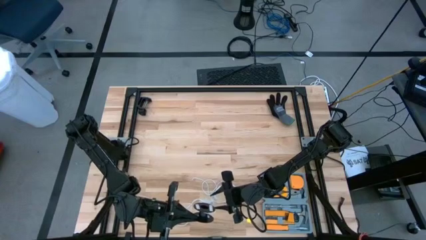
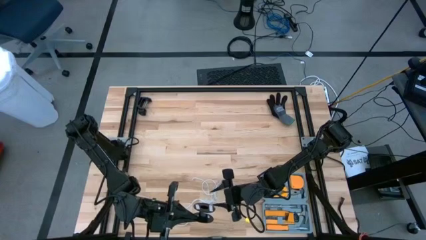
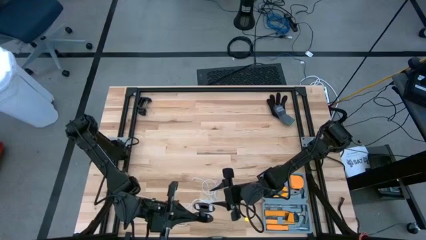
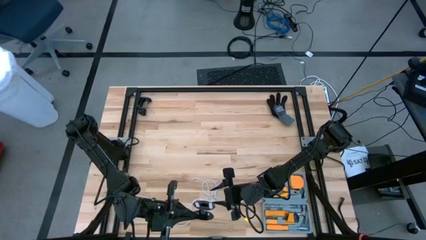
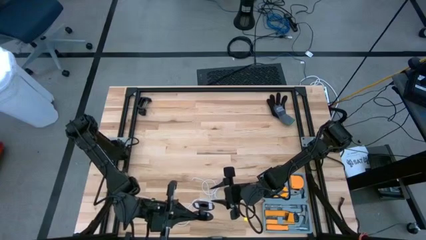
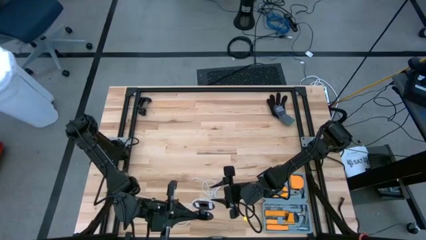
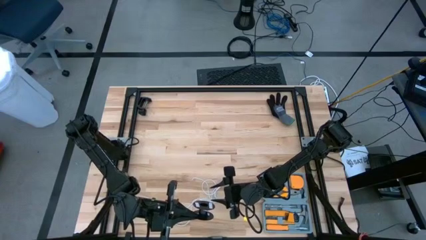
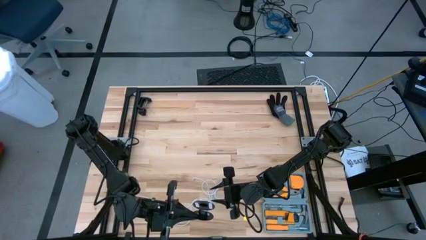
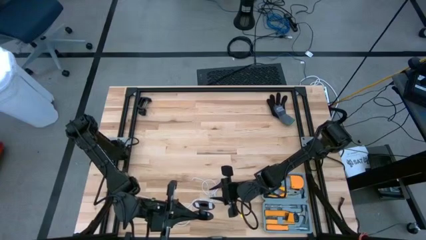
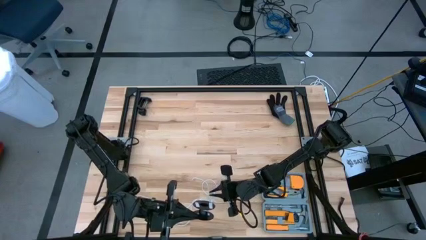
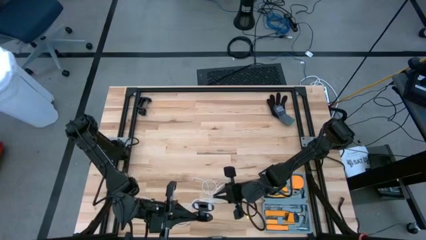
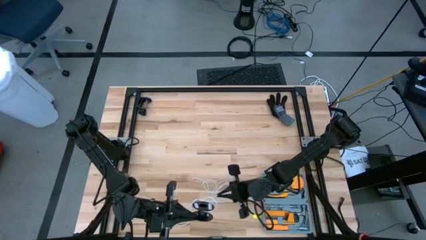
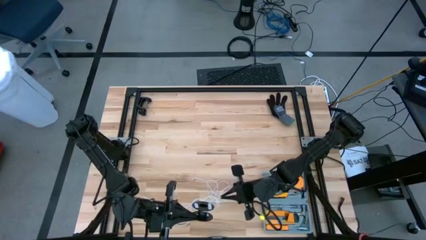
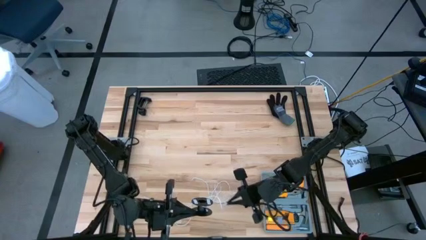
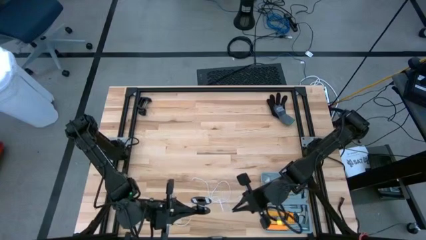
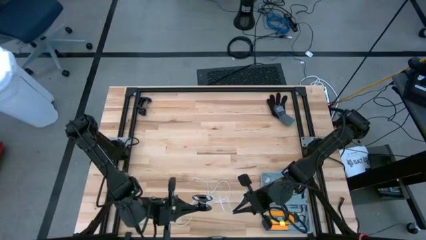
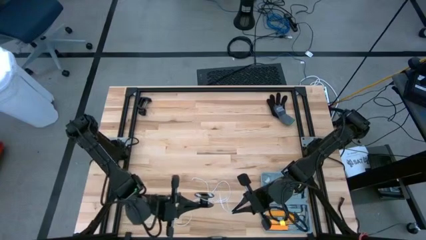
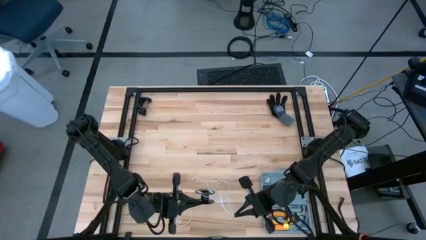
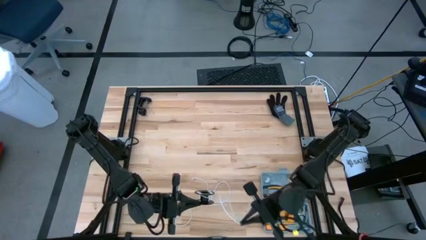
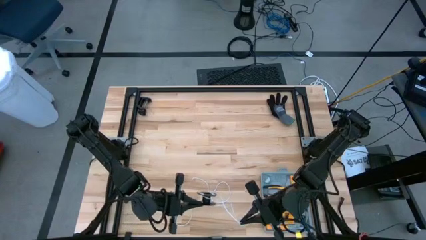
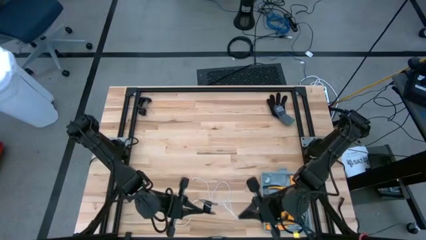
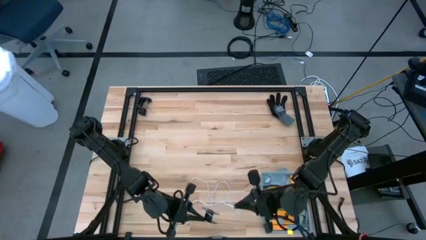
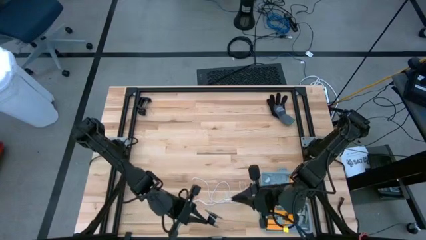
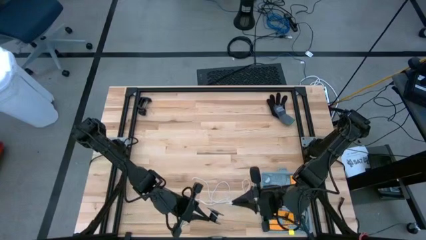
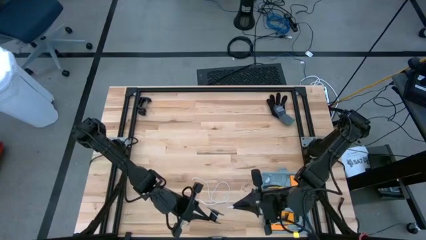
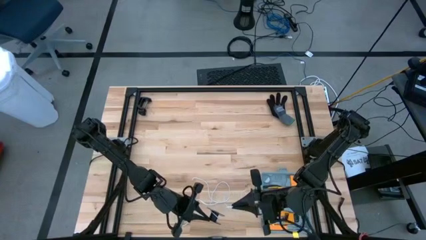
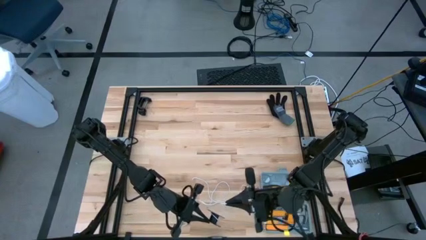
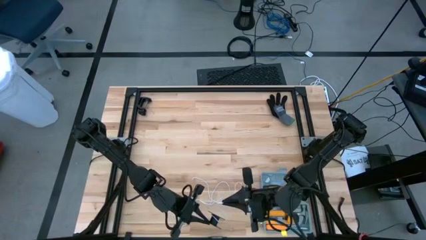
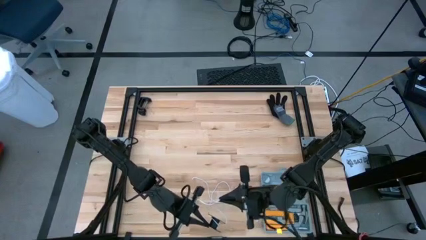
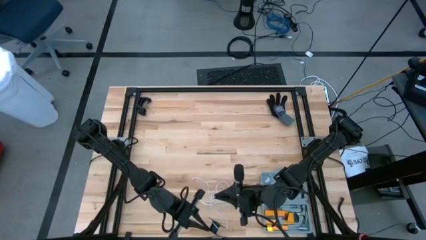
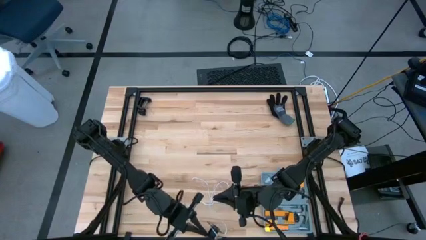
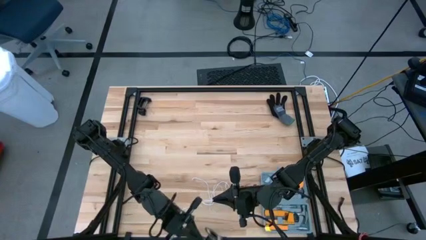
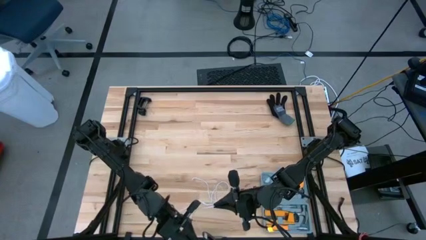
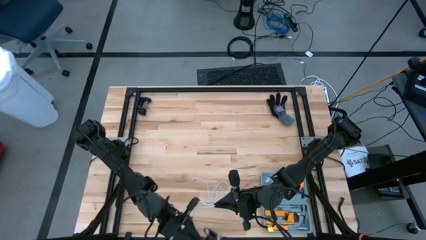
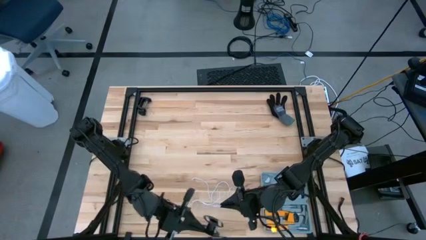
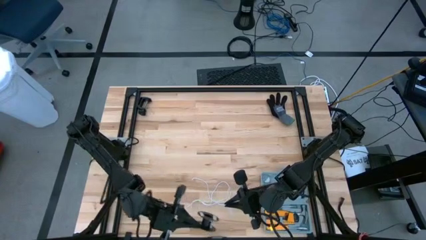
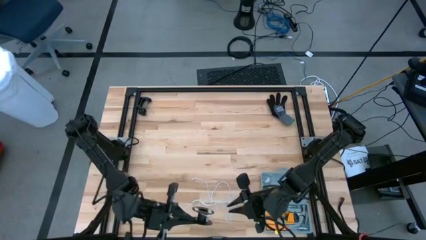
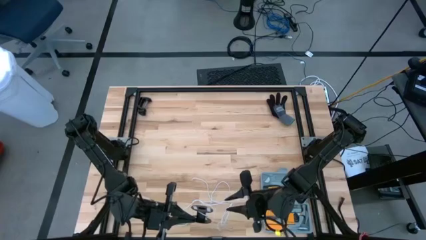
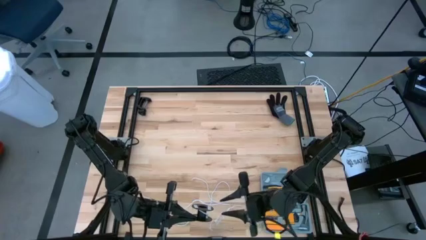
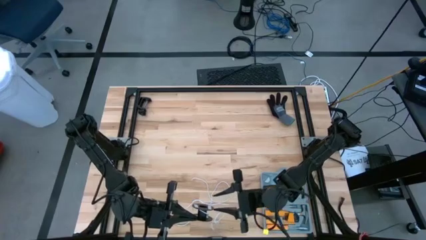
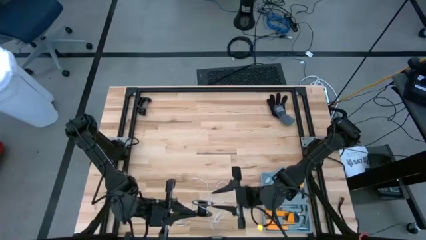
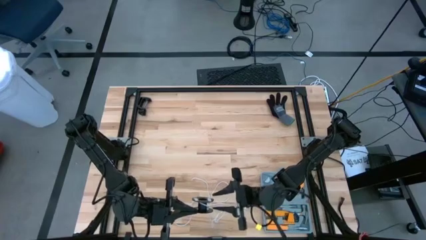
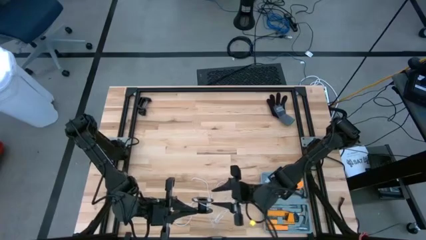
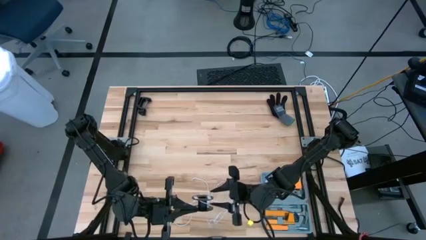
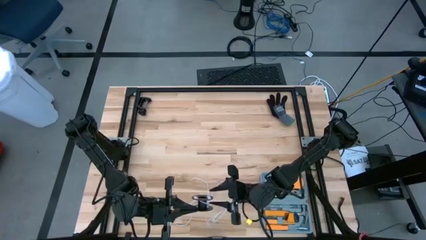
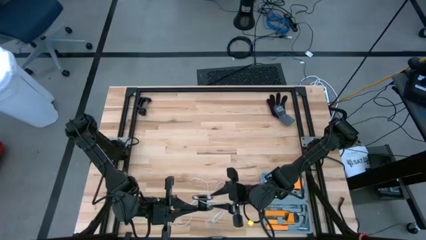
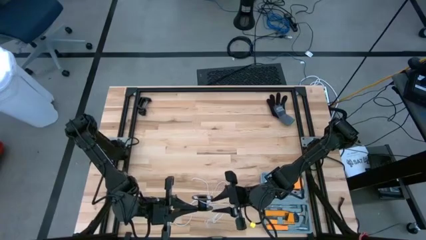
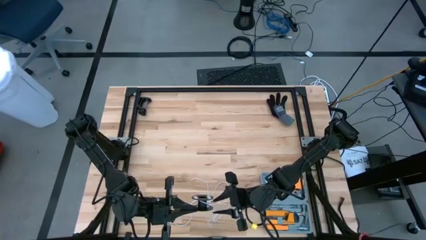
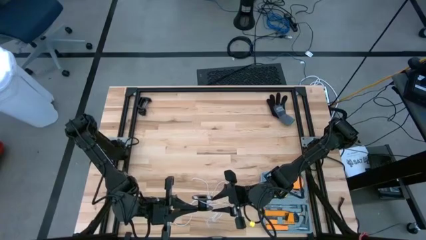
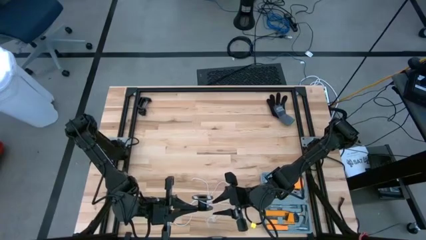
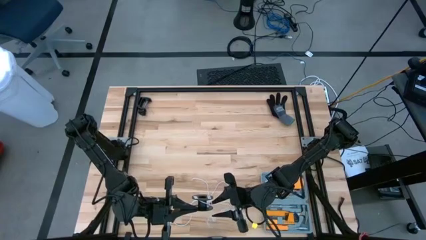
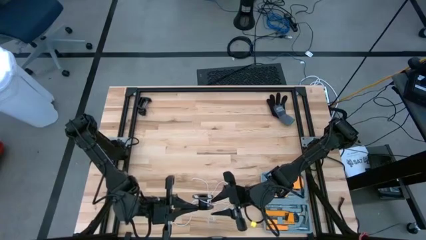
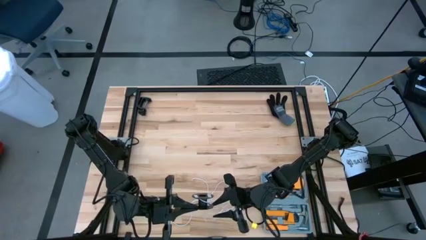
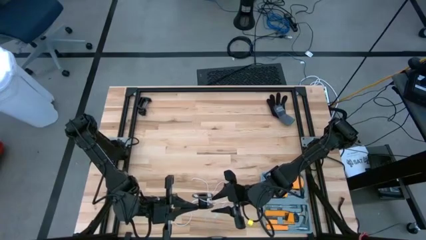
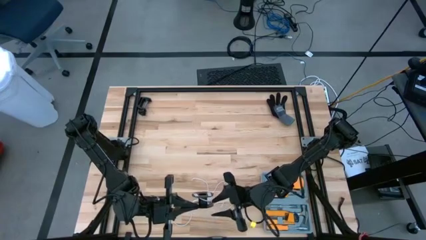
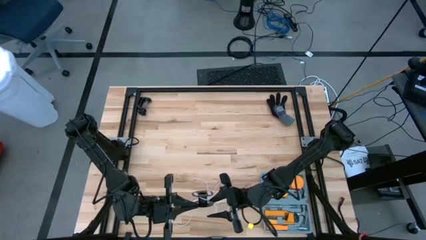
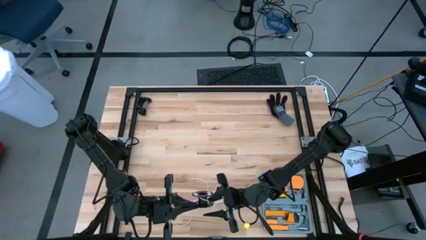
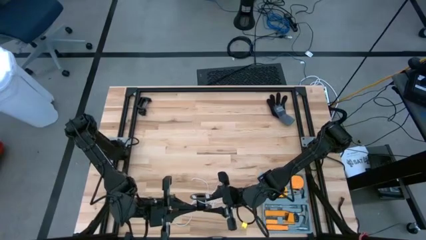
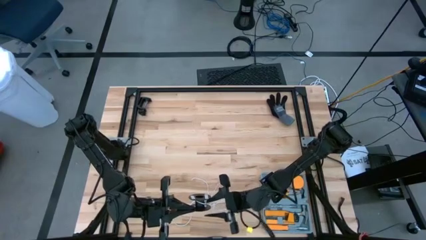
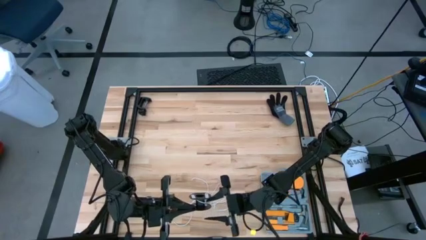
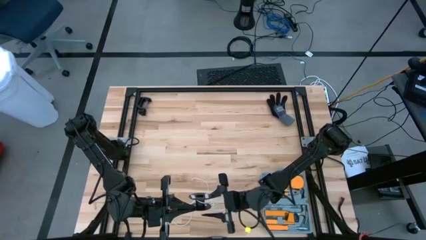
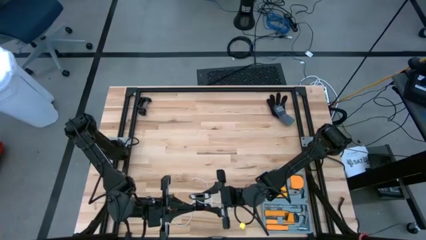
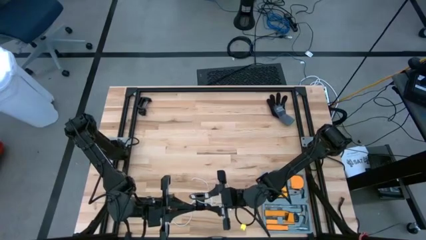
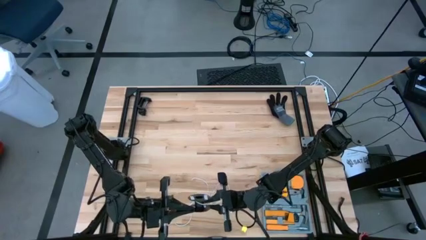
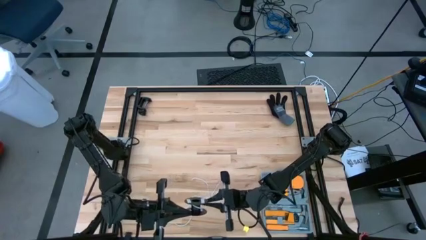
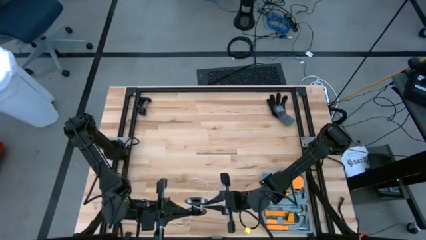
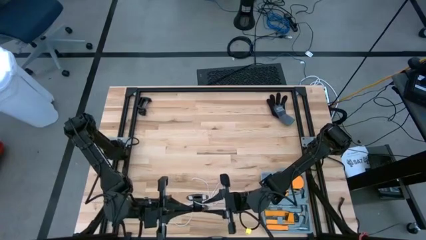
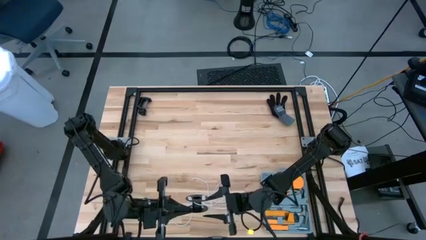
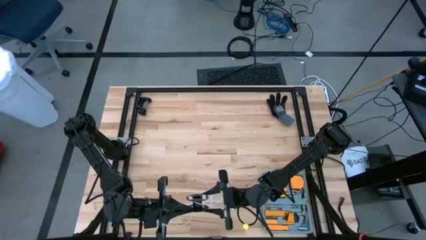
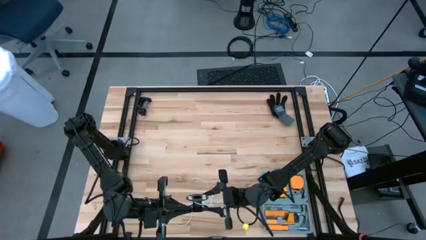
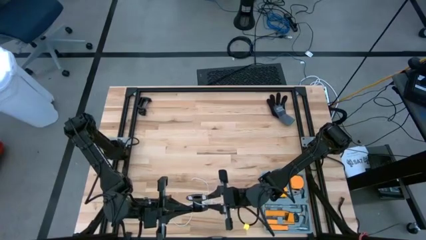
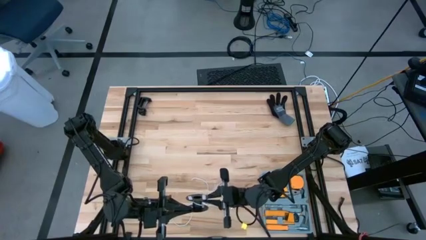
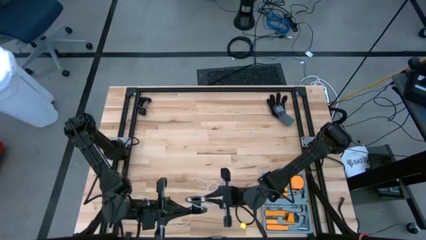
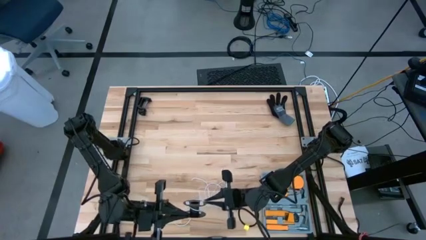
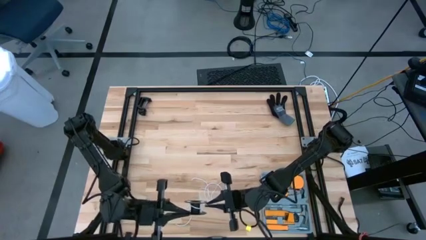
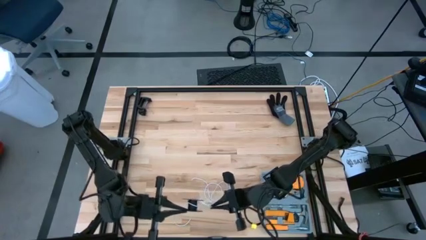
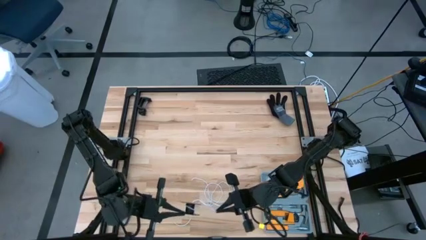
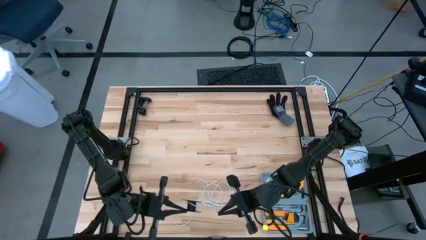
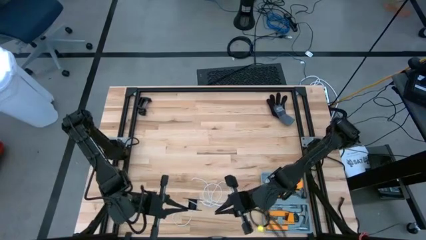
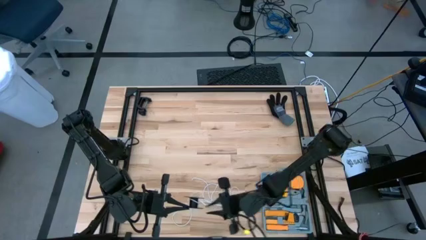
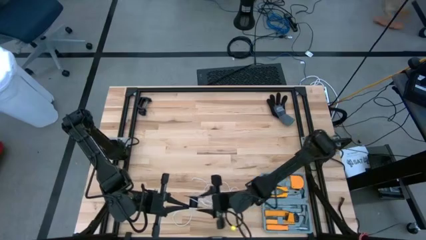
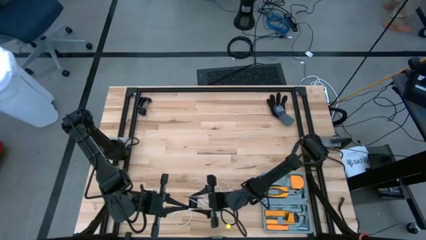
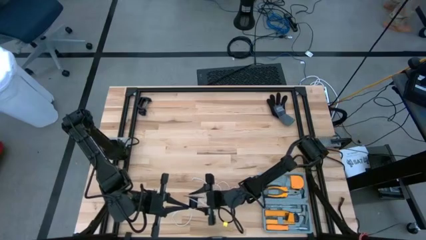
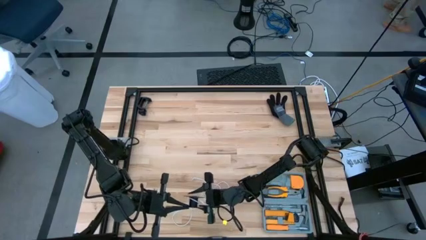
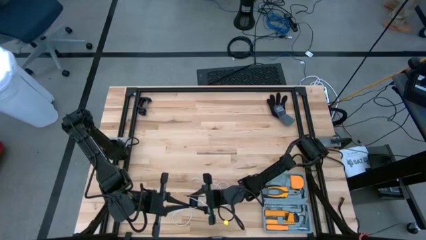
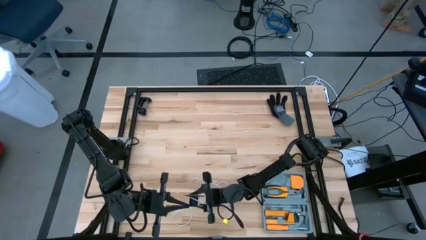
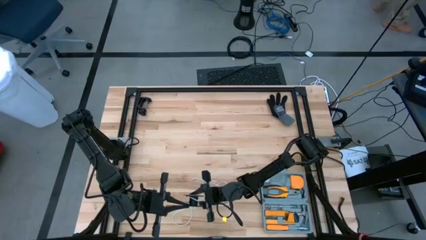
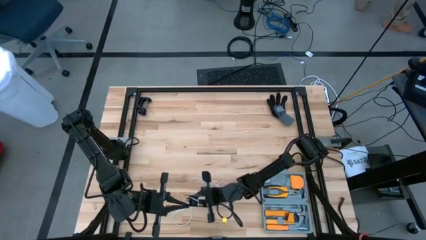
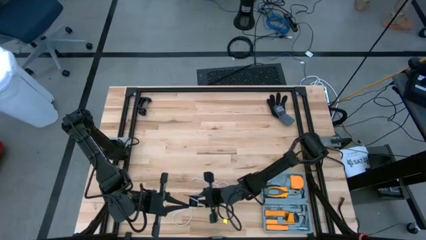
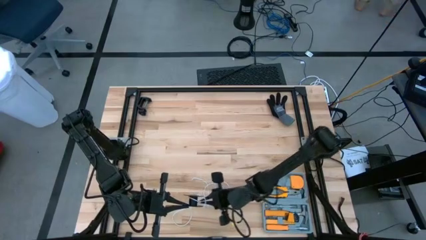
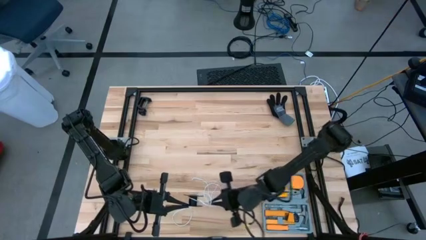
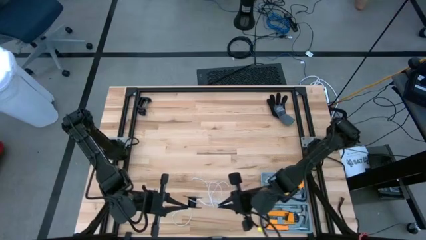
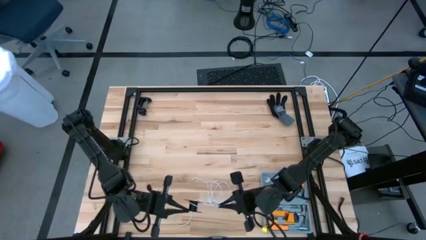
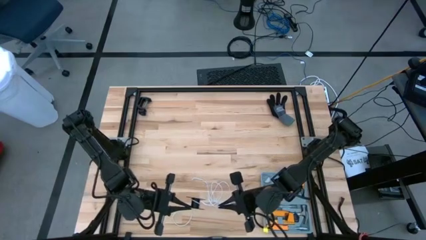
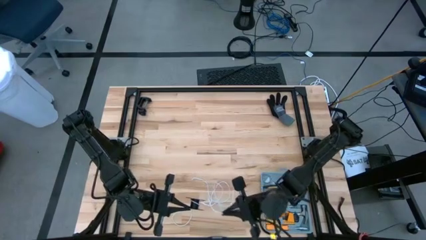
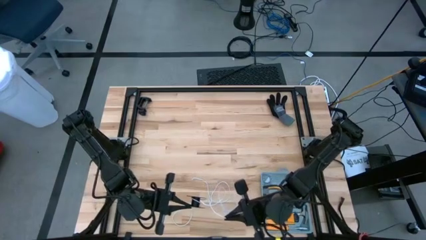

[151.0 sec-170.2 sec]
Task: Coil cords
Coil the white cable wire onto the spool
